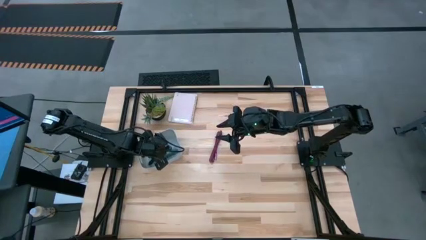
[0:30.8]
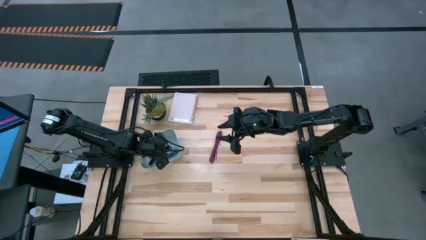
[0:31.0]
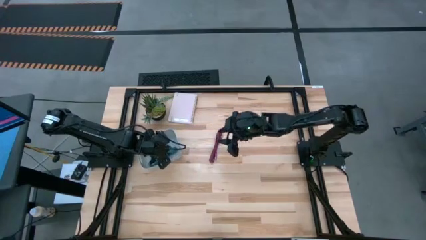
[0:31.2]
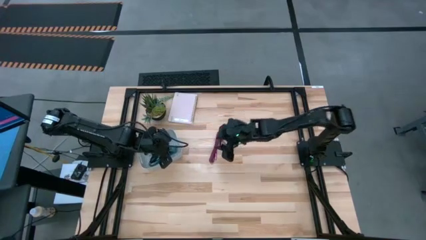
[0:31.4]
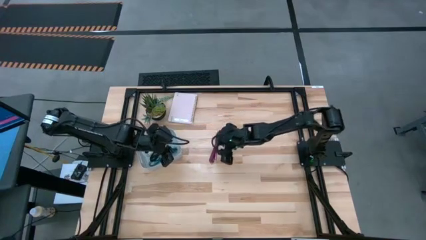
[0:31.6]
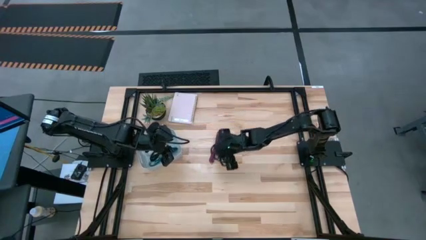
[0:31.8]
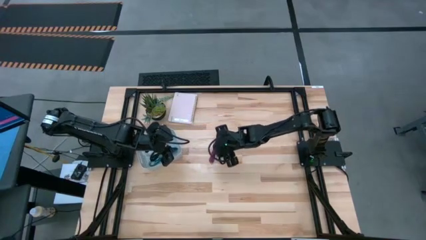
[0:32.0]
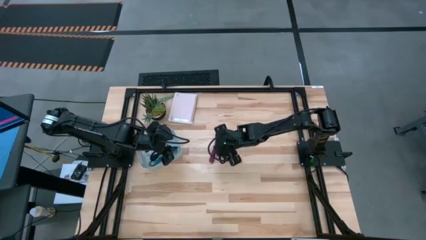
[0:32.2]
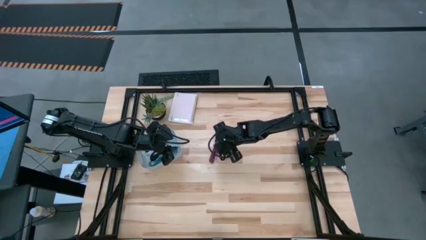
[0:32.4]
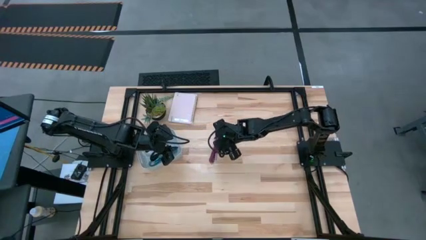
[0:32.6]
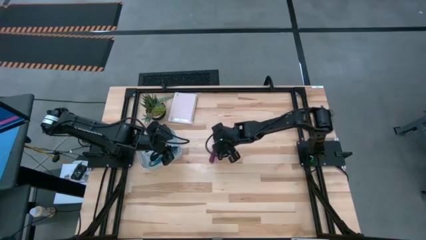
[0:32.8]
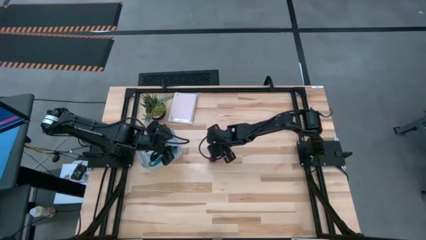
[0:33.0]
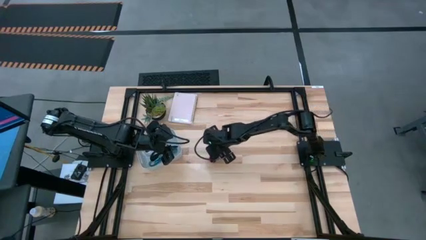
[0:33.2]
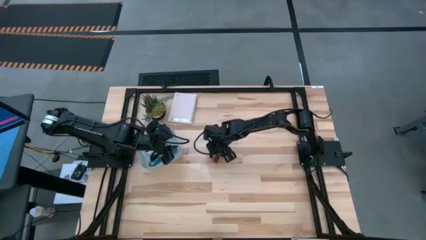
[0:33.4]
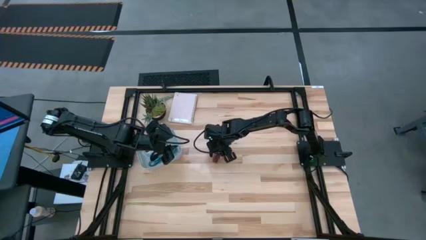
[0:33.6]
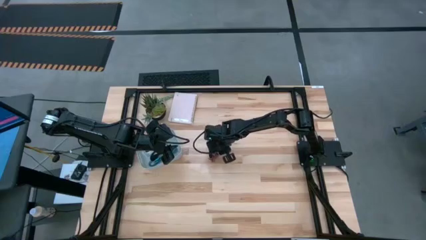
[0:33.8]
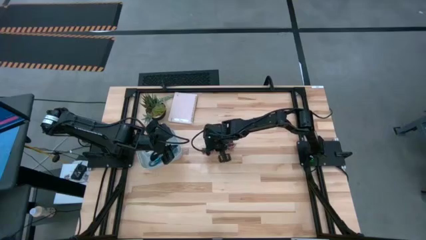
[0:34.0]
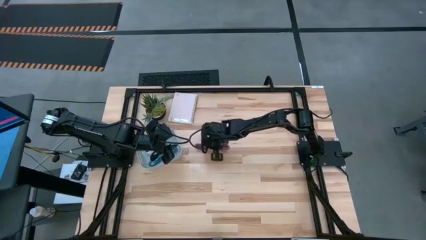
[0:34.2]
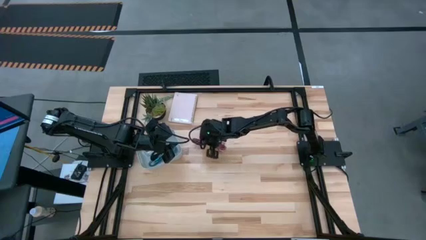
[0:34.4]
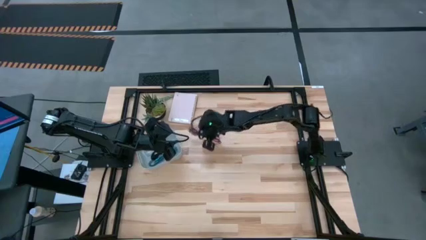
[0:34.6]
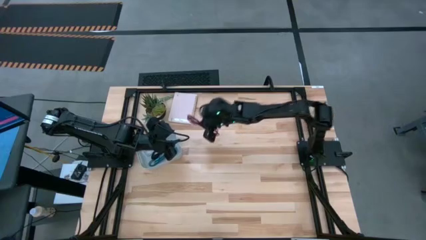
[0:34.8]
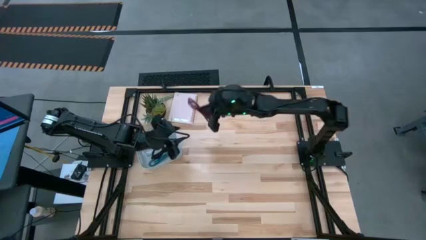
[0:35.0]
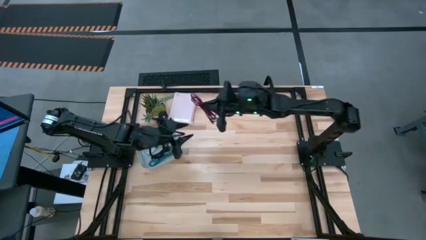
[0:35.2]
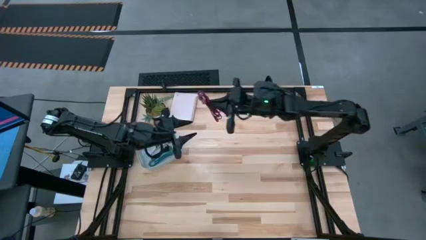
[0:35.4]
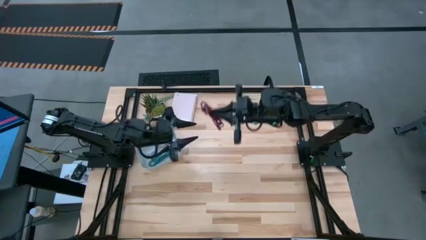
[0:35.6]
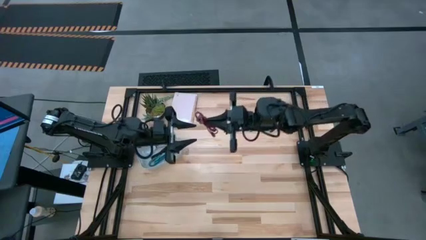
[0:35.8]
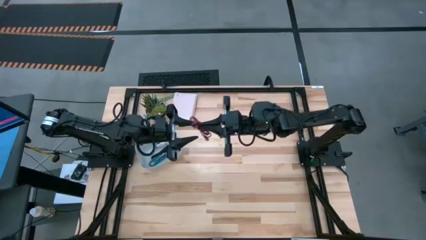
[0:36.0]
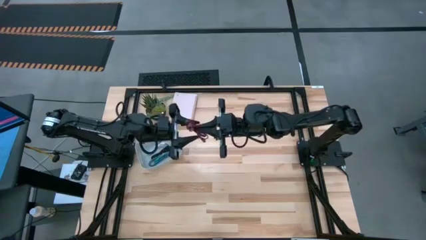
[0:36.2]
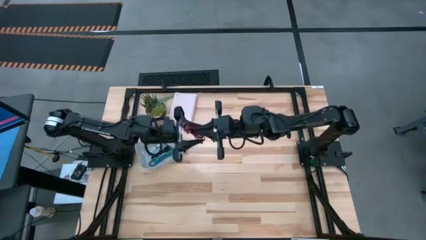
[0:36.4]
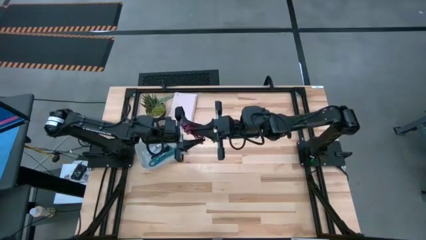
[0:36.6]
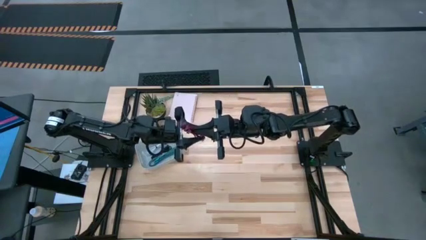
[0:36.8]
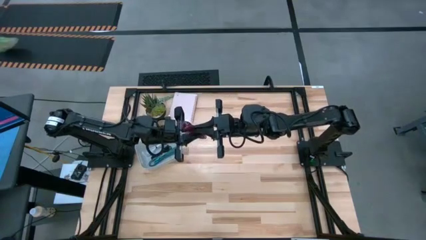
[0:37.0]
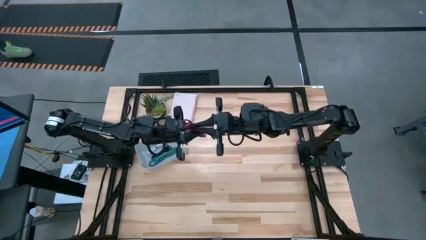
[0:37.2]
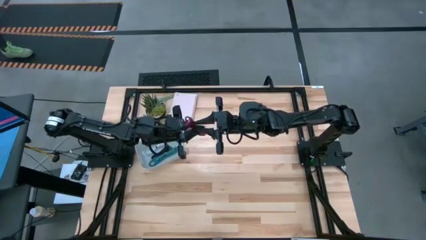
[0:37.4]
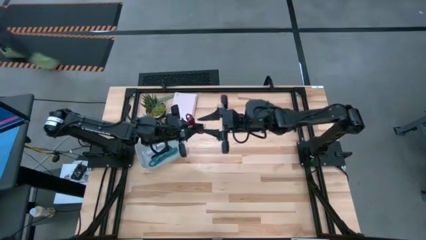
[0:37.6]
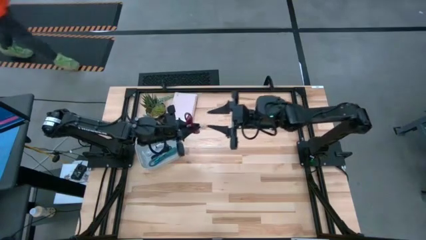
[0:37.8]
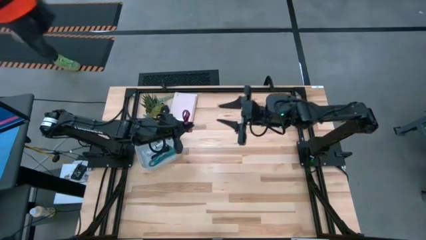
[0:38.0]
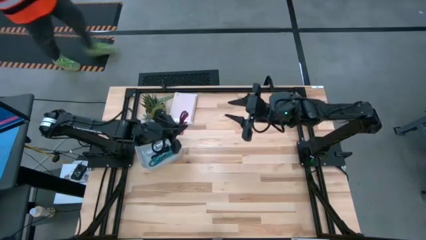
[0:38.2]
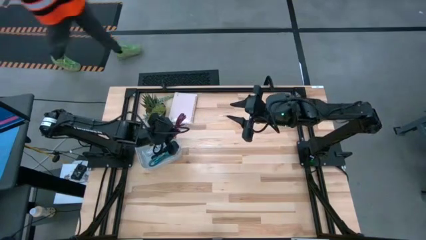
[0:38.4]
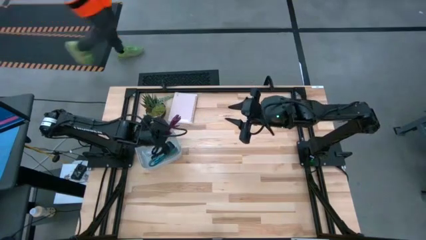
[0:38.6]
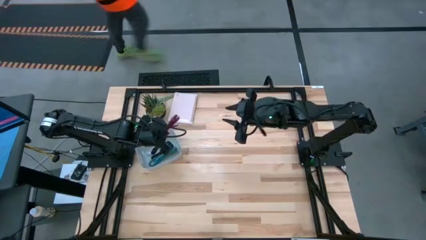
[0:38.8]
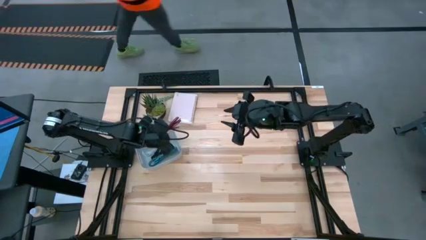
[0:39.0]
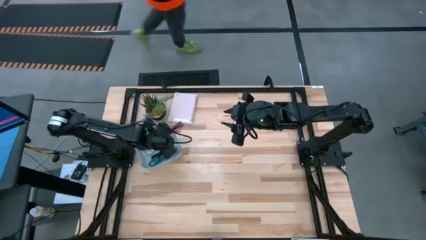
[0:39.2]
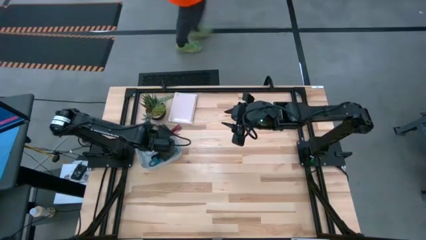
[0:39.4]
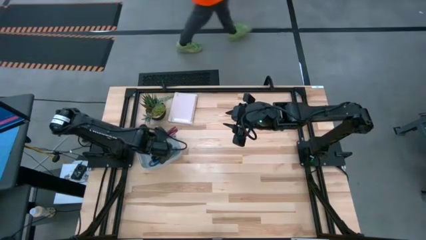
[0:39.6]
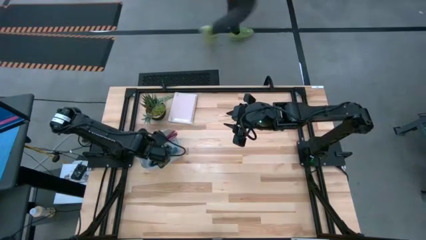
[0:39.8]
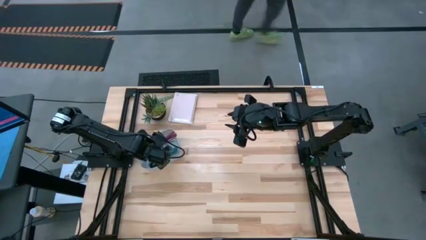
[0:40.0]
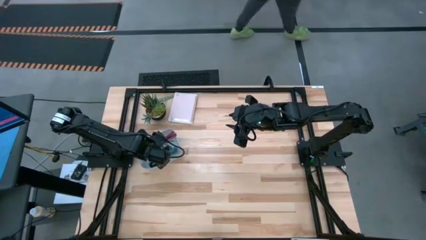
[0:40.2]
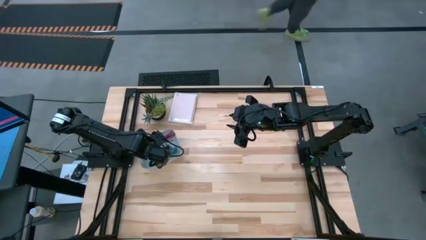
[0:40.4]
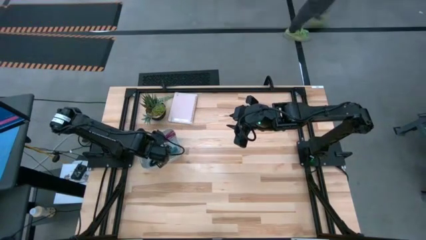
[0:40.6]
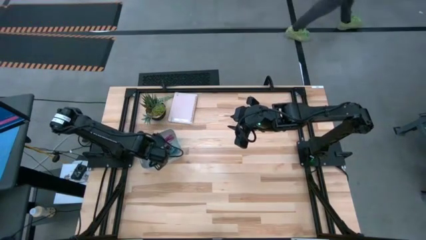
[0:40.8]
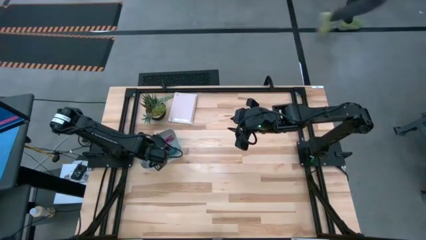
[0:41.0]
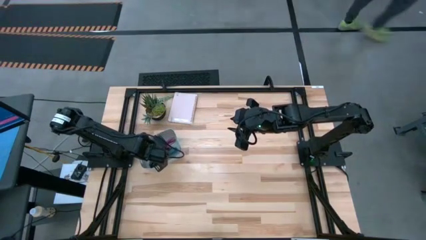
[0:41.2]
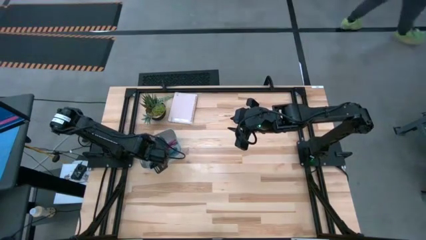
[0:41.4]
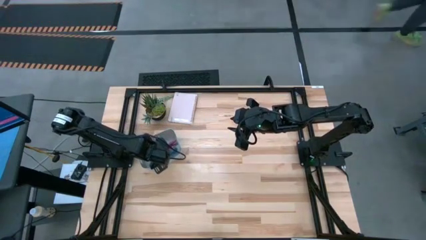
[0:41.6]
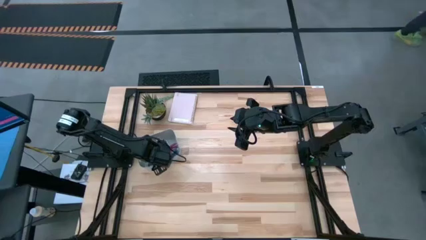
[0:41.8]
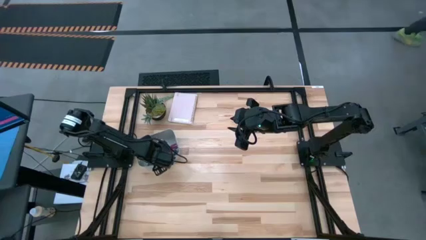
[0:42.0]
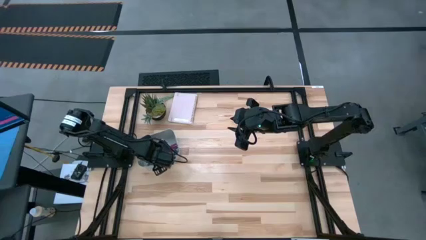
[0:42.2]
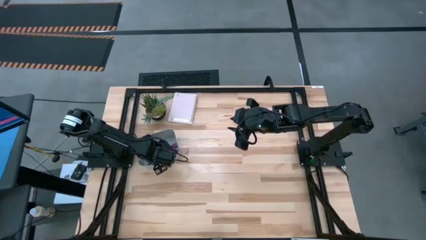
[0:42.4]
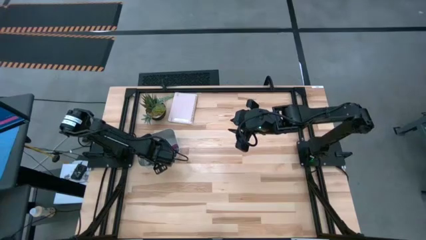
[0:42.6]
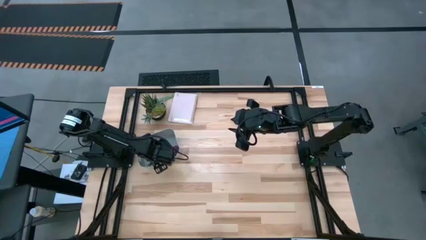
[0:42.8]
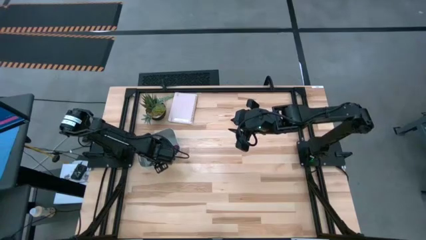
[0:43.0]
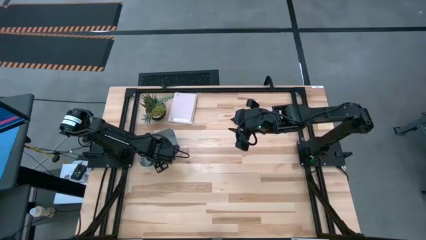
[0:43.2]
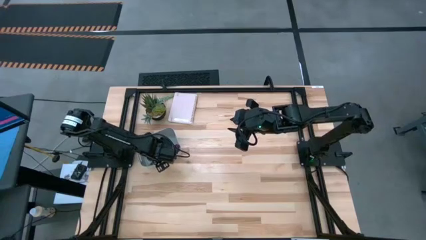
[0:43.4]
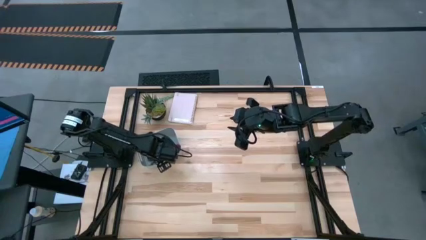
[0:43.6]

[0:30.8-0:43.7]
Task: Pick and place USB-C Cables
Put the pink USB cable into the gray bin
